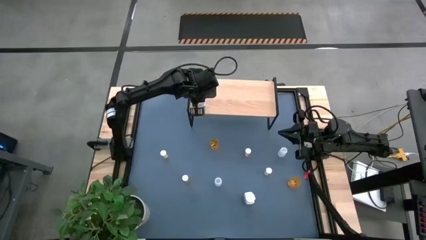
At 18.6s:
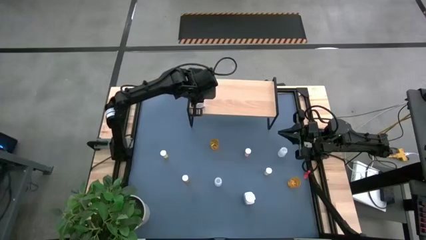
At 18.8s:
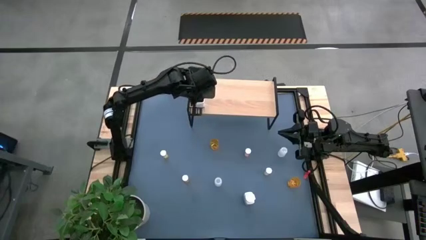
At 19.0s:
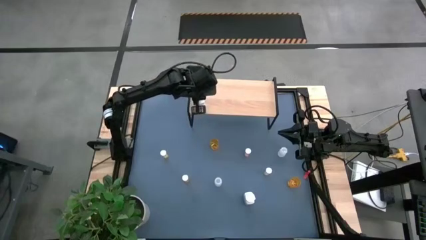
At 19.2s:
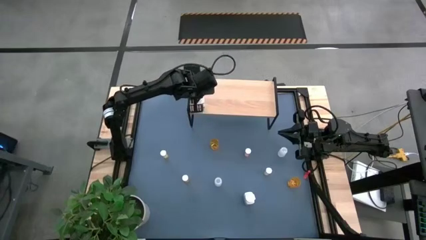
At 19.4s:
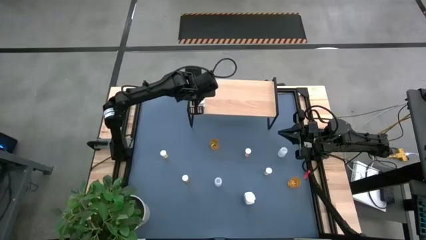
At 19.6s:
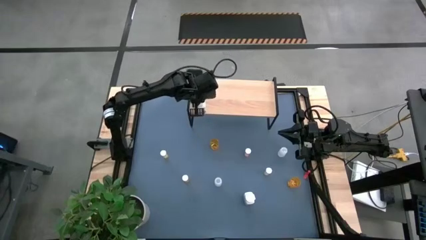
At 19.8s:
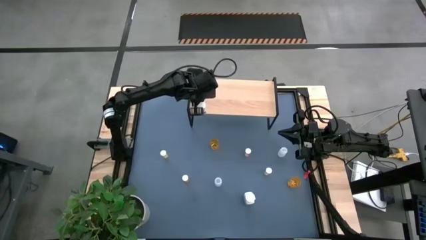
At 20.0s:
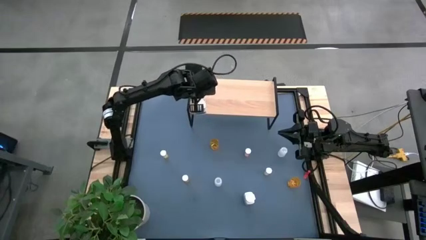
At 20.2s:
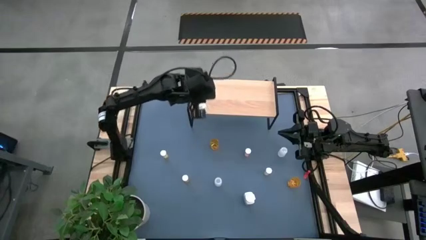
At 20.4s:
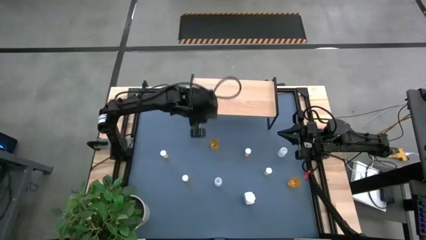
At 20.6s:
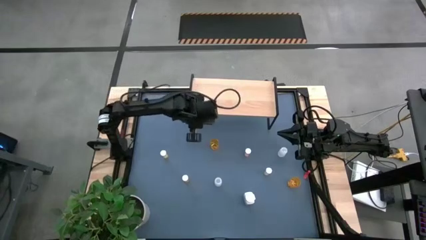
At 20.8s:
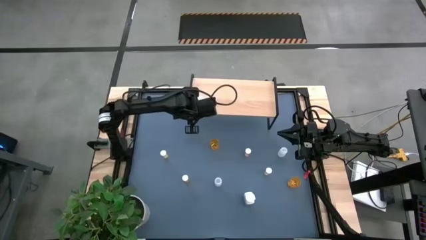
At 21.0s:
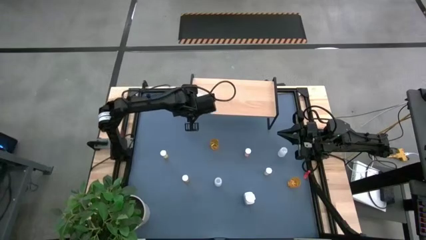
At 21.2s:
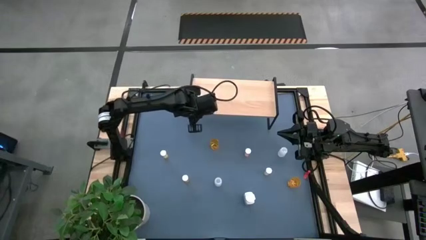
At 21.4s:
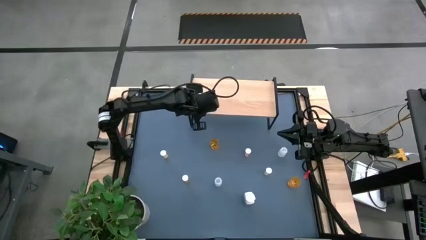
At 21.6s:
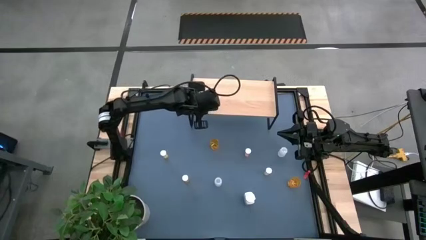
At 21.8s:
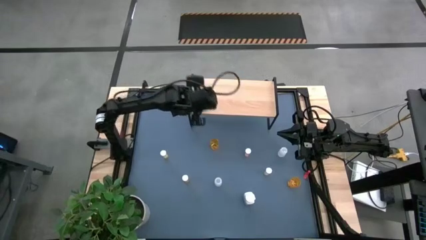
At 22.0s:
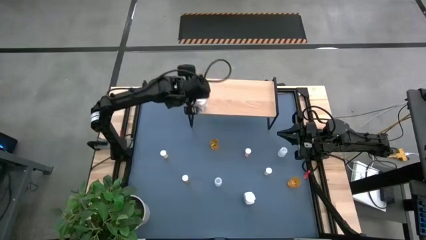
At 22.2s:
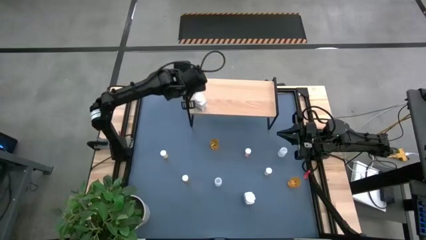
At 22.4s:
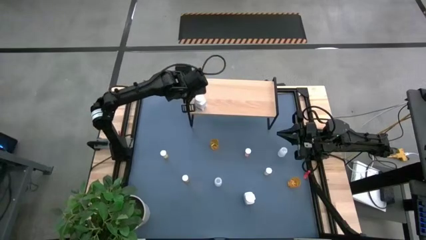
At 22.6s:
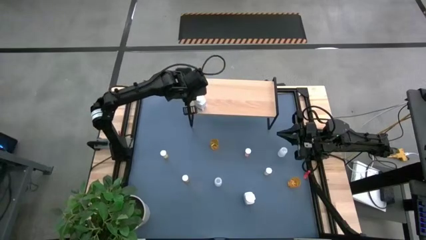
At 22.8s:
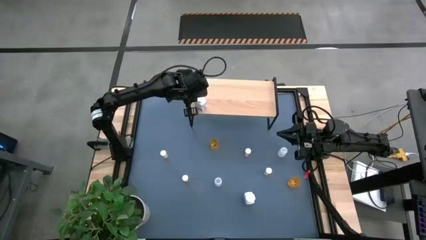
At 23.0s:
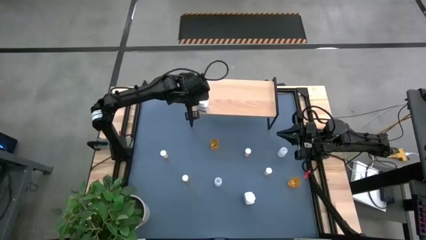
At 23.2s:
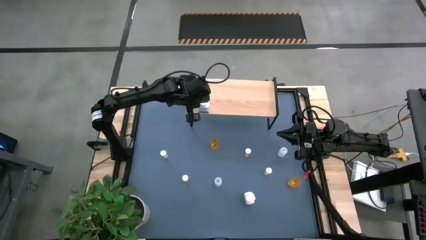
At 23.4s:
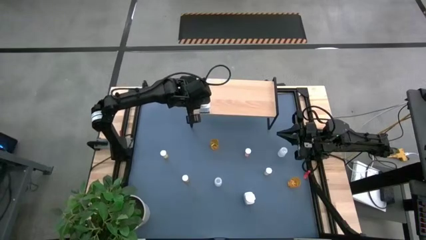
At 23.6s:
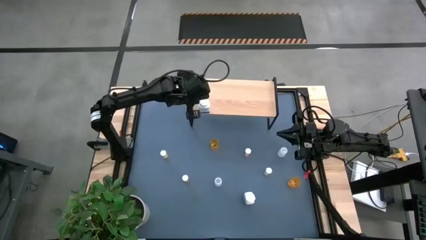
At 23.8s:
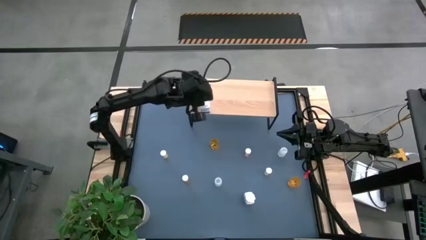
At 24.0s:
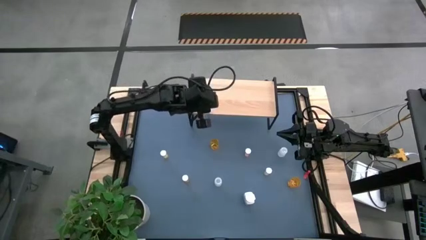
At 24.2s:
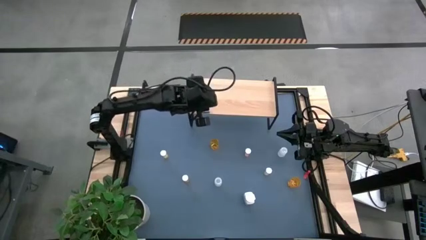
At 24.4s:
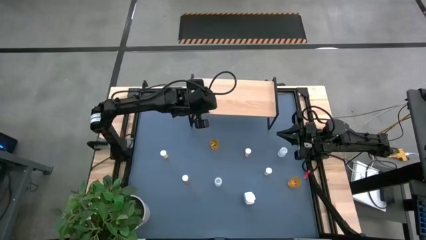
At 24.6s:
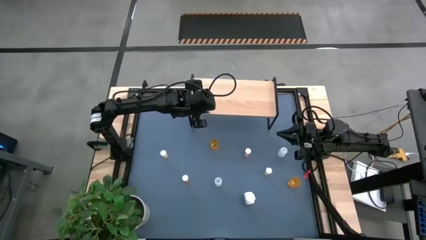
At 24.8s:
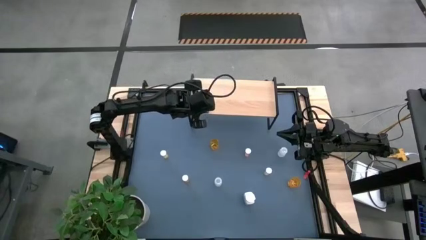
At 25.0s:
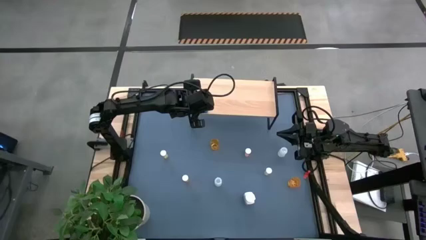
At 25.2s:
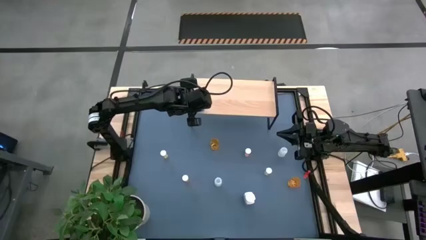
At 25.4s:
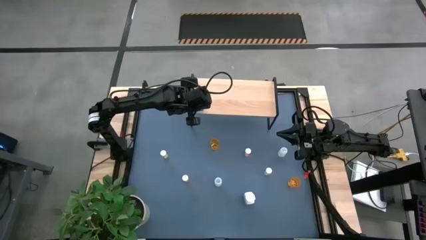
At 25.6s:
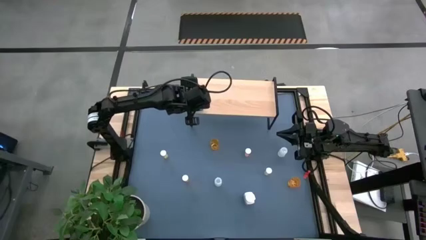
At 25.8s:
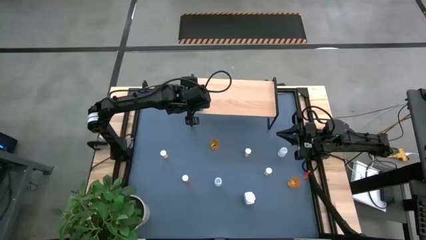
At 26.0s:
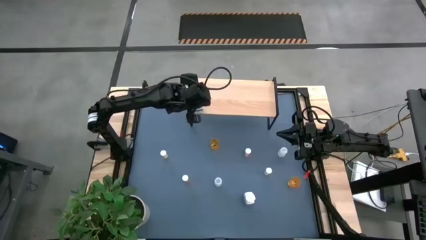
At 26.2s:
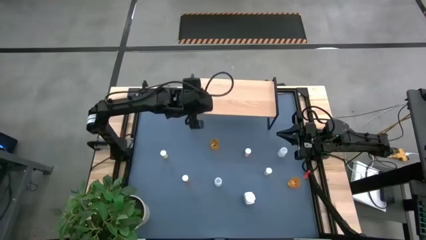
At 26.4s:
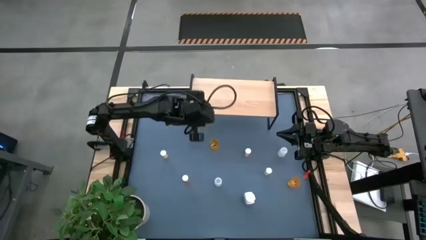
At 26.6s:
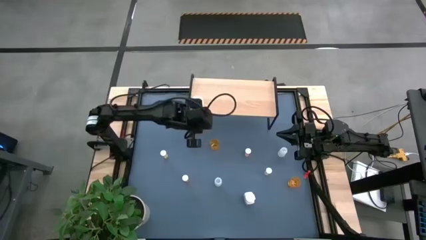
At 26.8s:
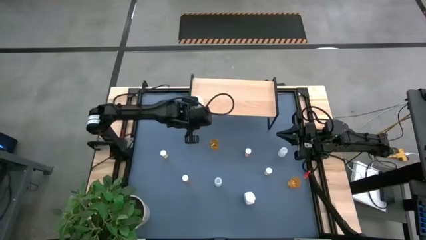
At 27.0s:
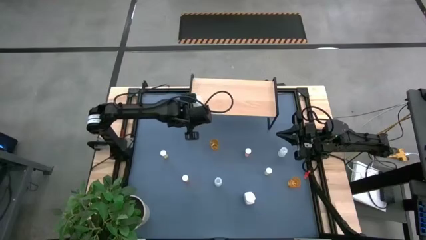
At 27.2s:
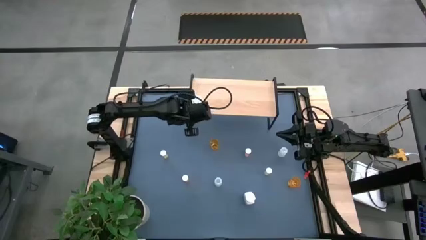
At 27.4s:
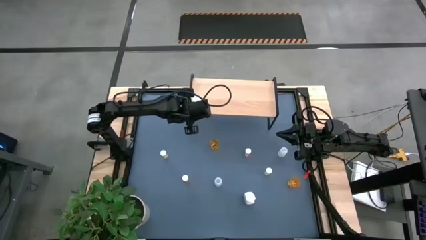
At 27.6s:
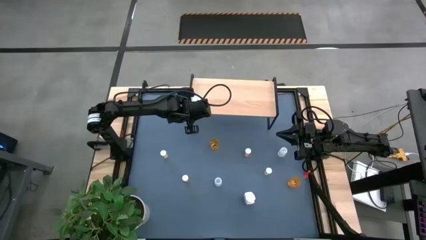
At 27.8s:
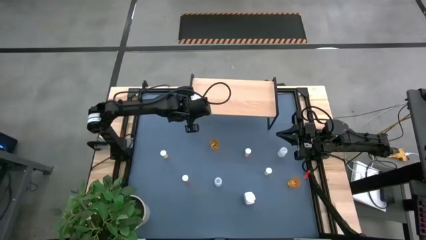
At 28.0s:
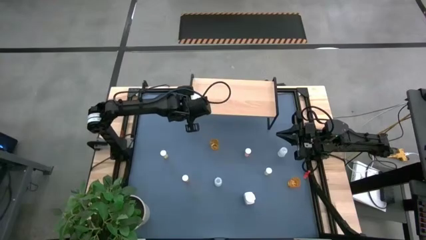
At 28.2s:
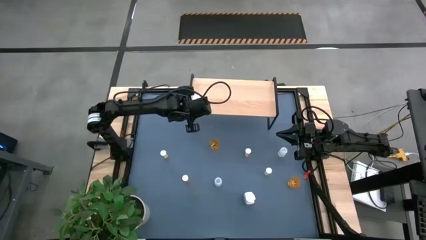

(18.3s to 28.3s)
Task: Pick and place medicine bottles onto shelf by color
Put the left white pill bottle on the shelf

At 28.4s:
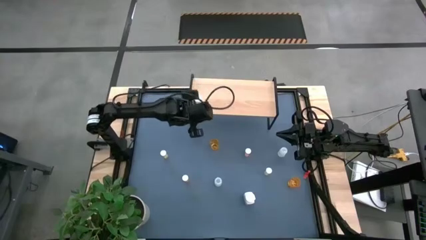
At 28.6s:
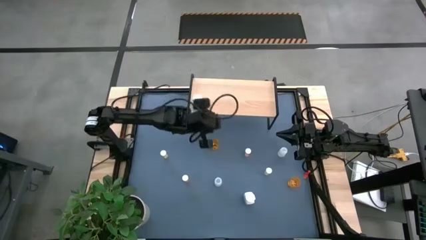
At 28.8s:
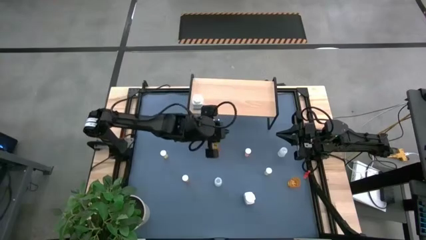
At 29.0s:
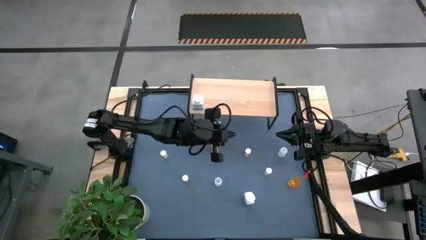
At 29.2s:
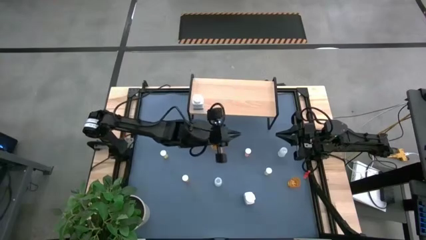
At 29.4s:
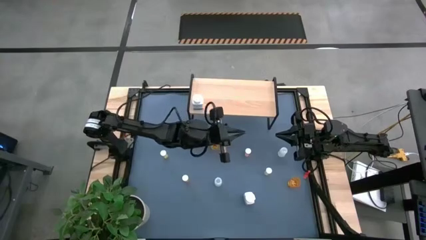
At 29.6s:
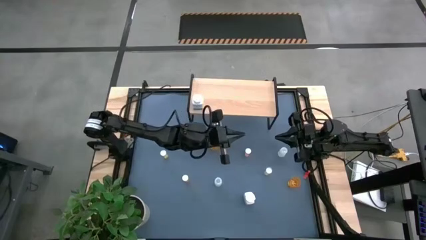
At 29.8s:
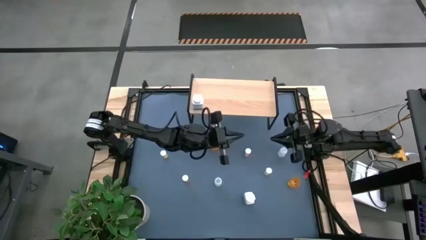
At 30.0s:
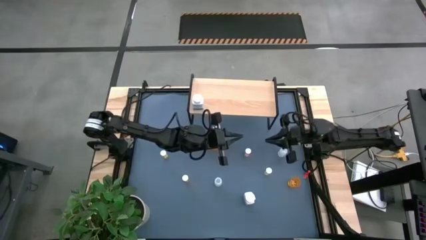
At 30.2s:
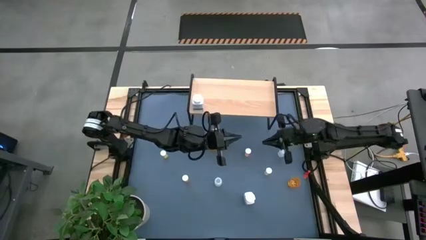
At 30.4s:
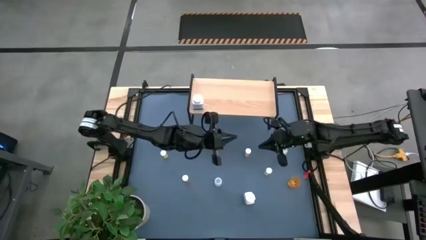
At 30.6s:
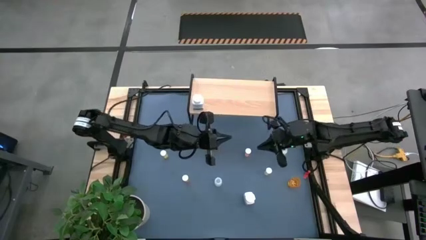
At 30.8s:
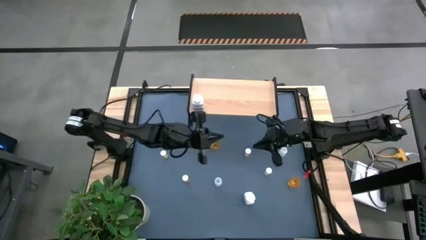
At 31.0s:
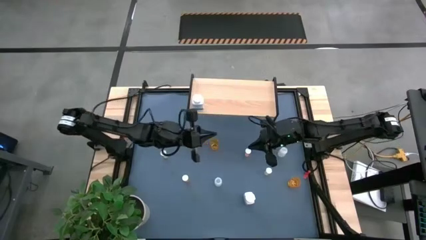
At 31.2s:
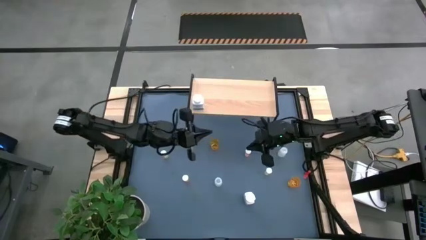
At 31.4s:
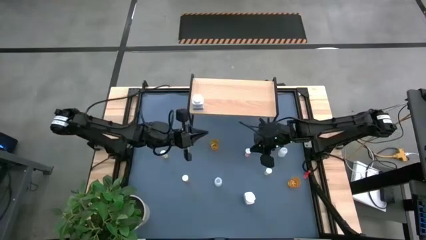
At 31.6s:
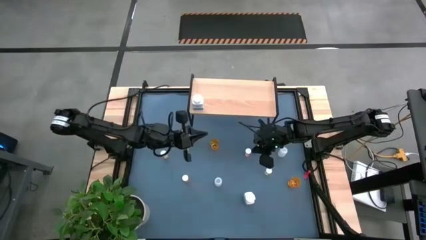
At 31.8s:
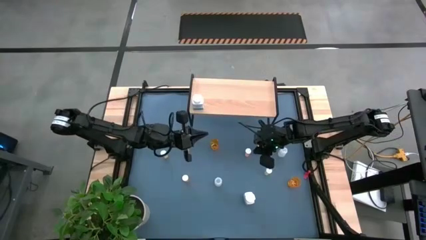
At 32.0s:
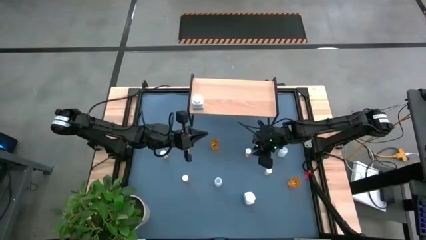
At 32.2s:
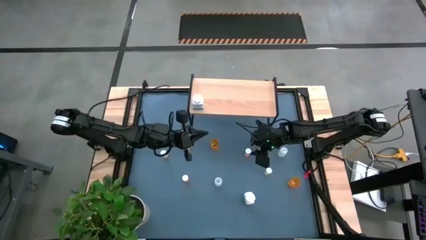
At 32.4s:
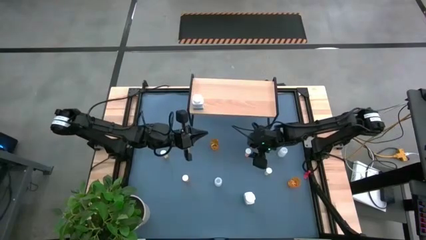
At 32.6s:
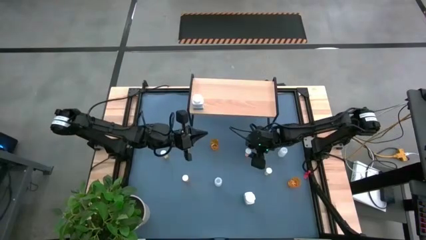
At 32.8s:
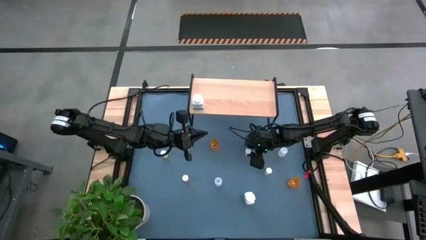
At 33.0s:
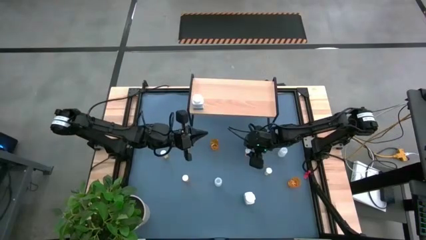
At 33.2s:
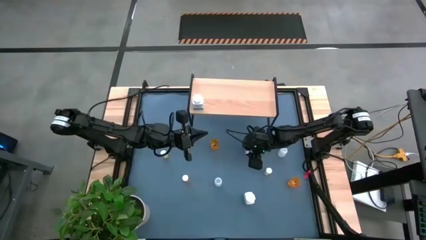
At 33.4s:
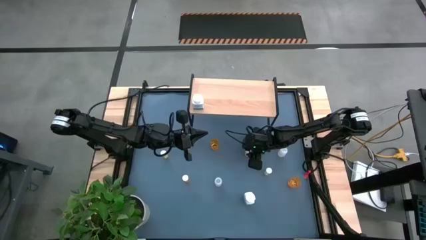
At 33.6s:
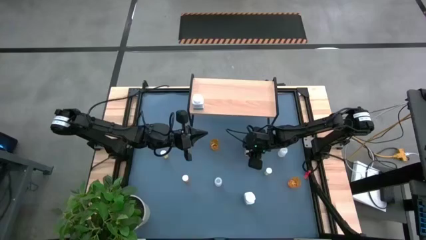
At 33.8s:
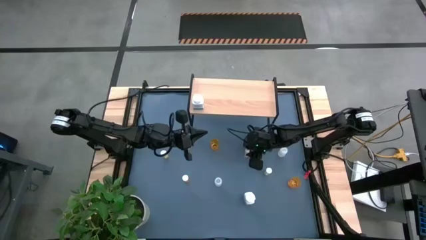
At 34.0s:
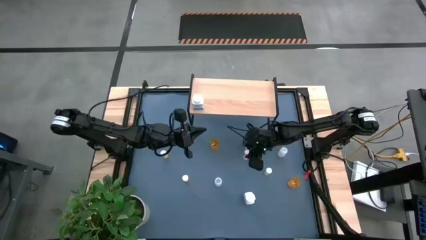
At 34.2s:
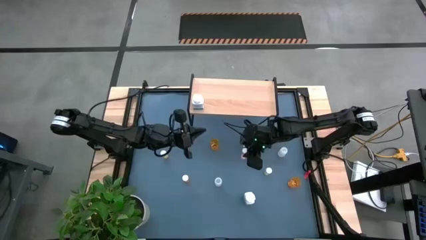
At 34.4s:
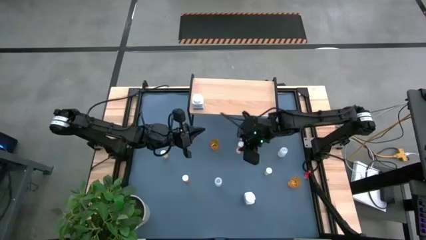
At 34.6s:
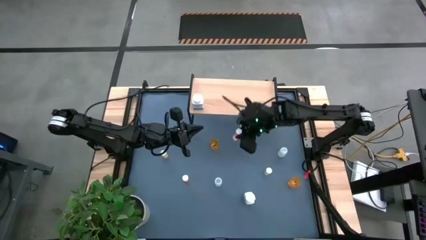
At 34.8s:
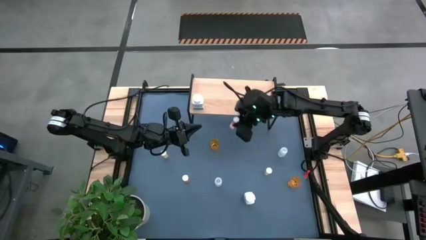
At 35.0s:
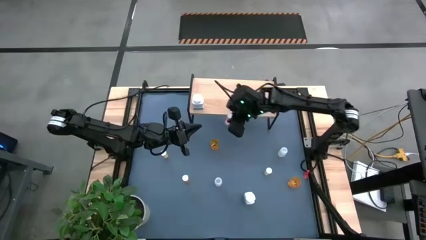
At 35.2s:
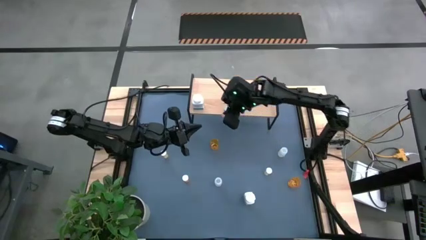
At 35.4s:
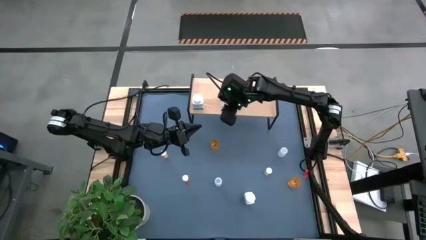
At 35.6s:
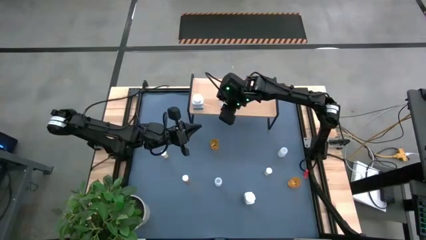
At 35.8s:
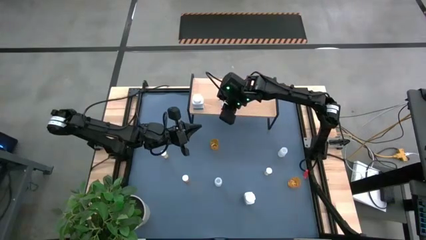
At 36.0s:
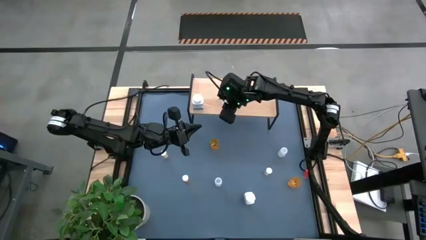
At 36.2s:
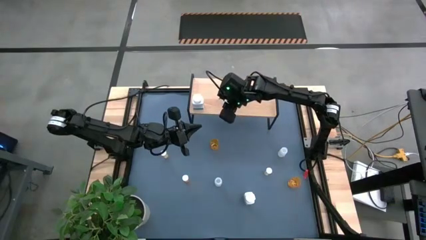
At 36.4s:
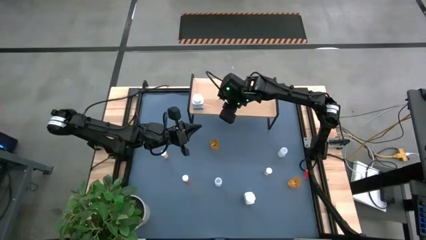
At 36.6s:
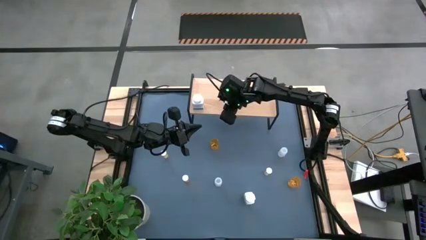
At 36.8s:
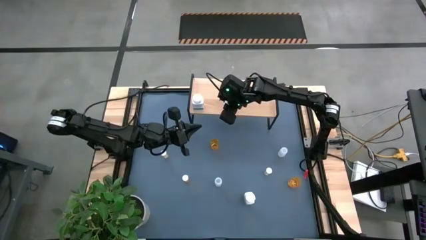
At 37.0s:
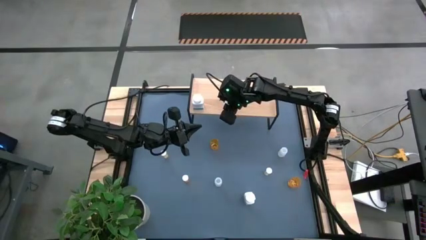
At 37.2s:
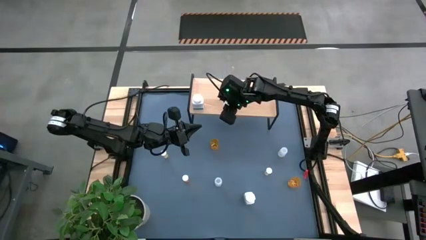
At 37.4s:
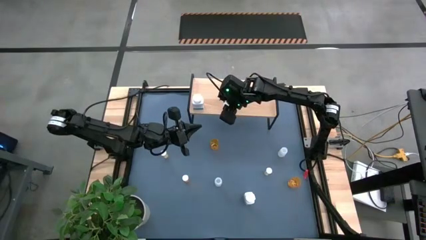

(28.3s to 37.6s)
Put the pink pill bottle on the shelf
